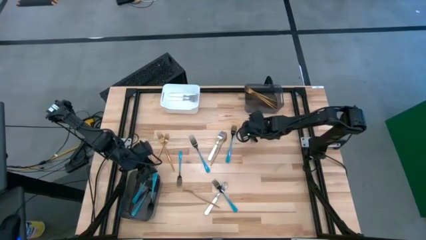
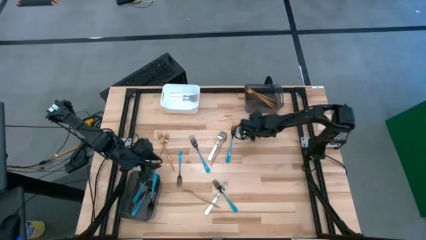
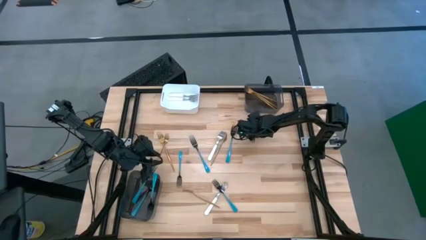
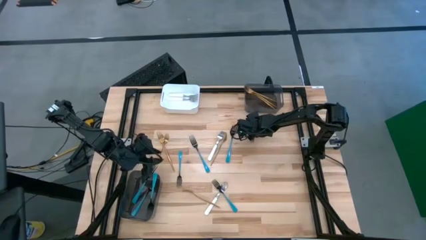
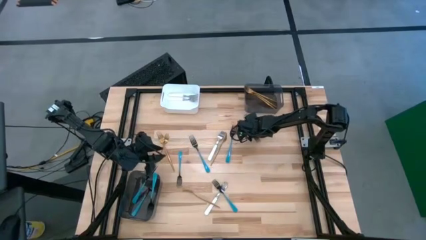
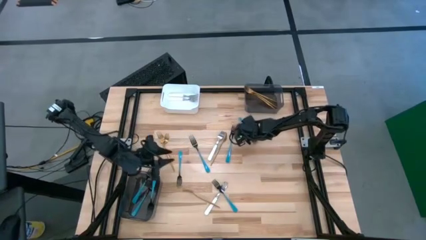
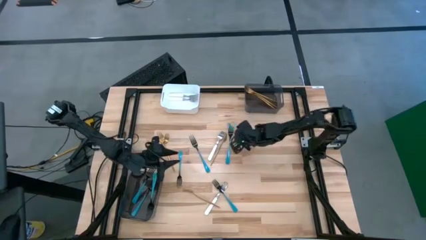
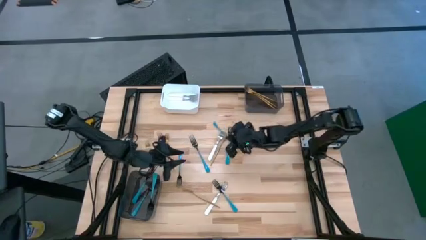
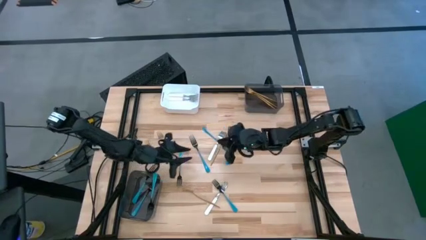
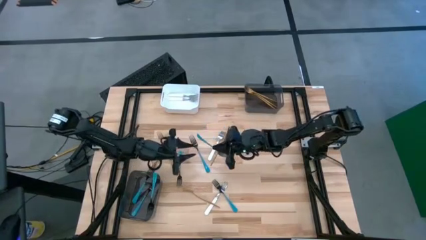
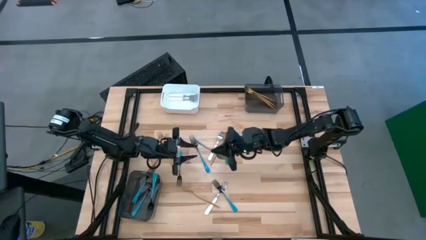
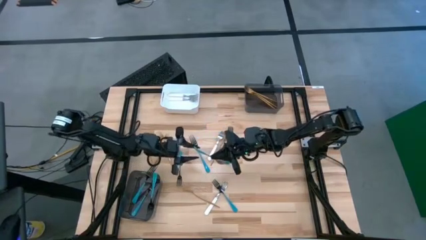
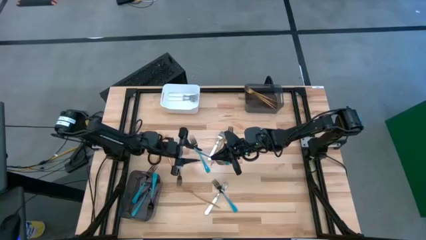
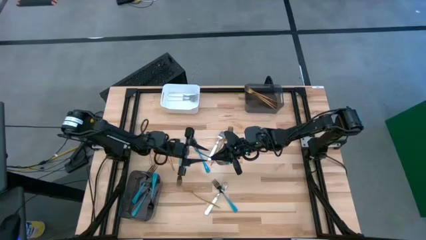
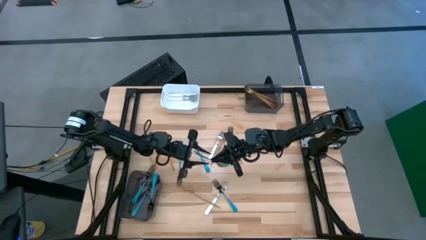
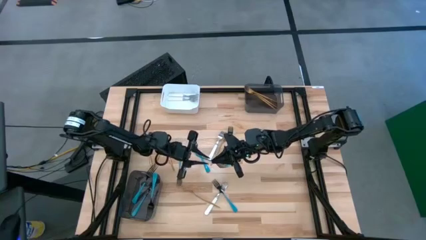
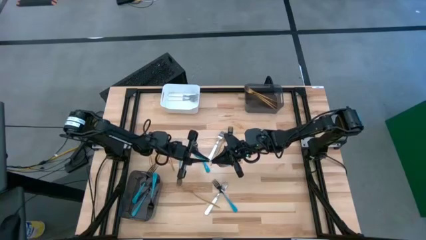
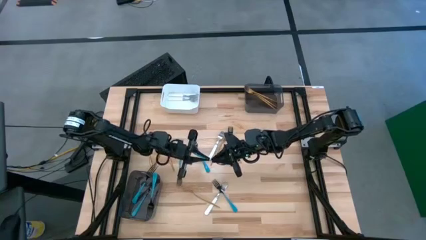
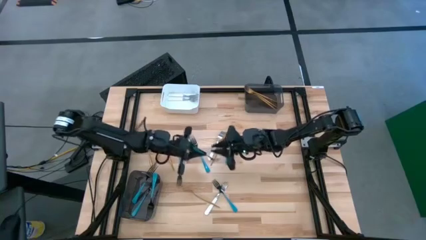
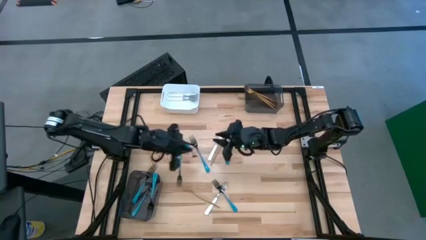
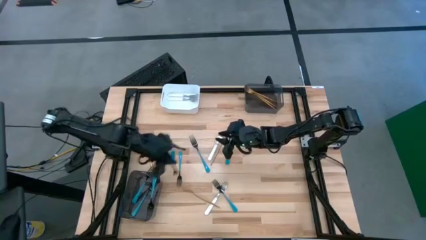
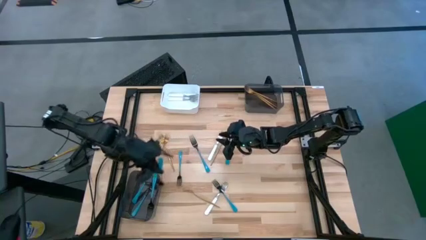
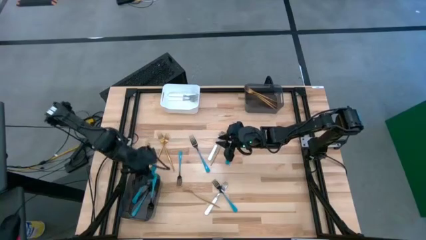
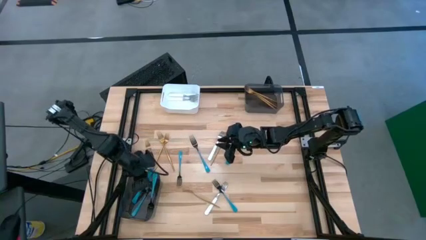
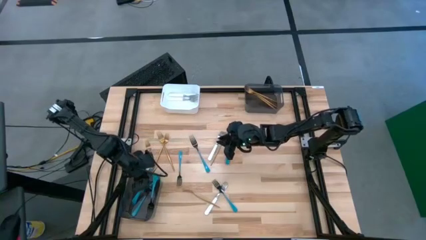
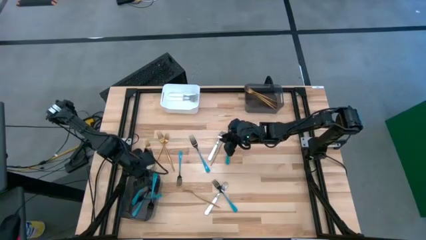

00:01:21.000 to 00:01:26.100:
Task: Sort silverware by color (type)
Put the blue fork into the bottom black bin

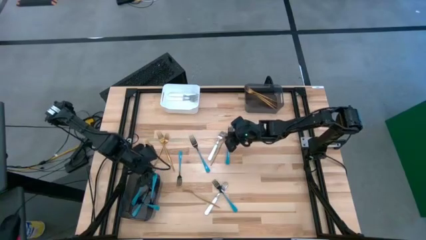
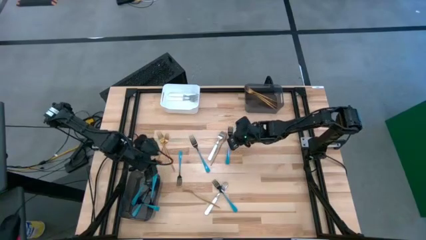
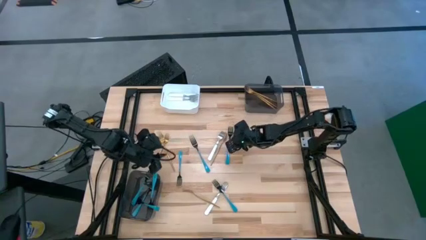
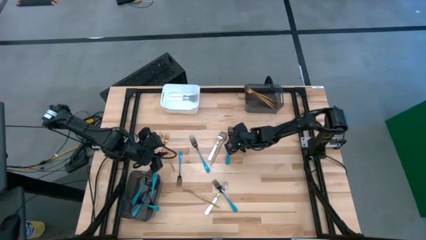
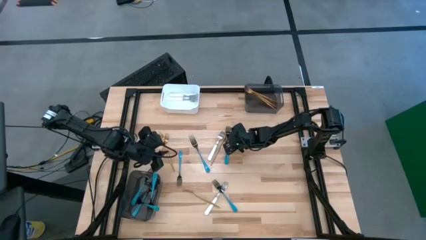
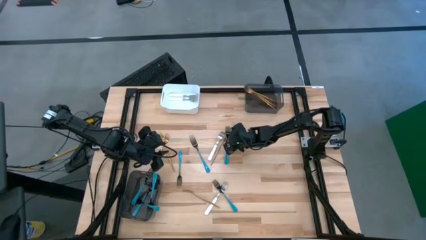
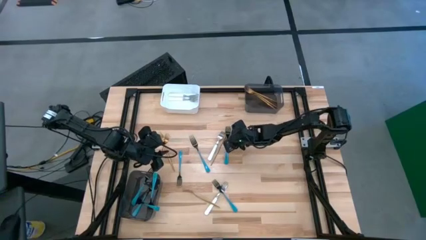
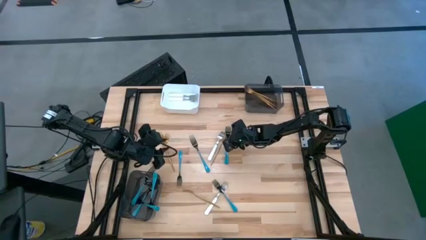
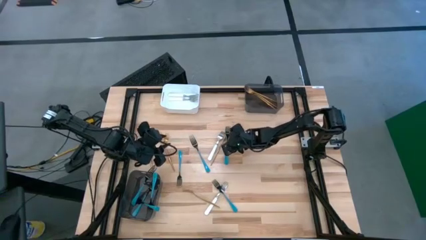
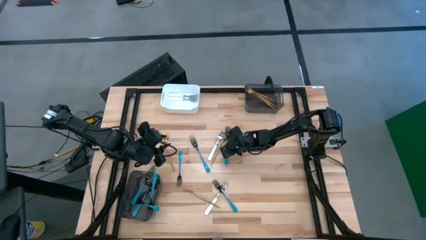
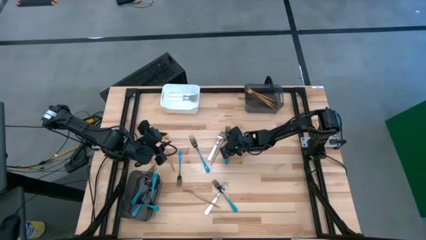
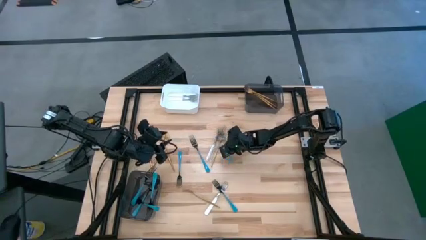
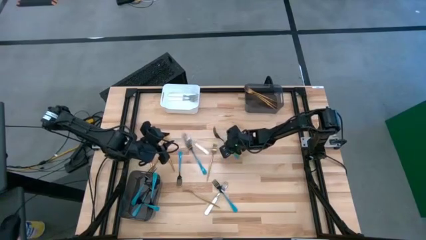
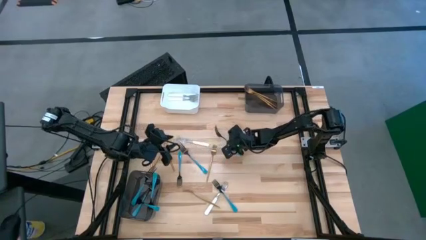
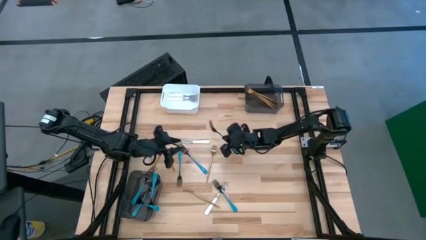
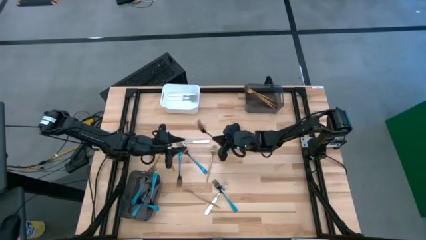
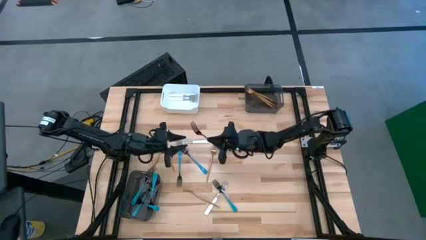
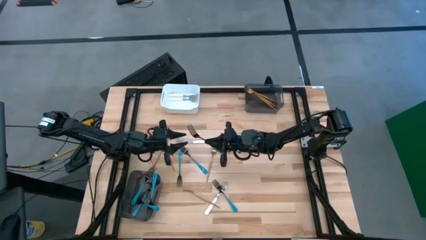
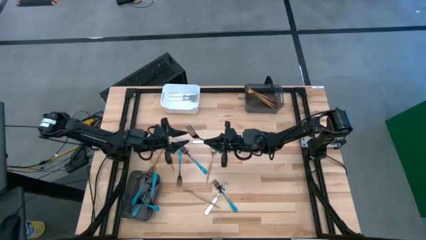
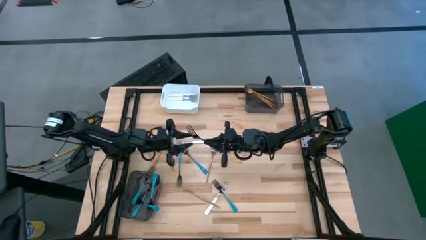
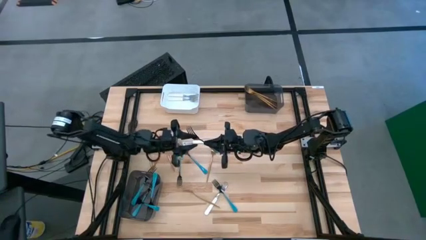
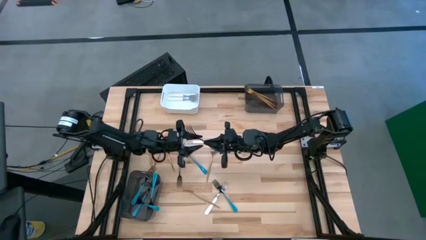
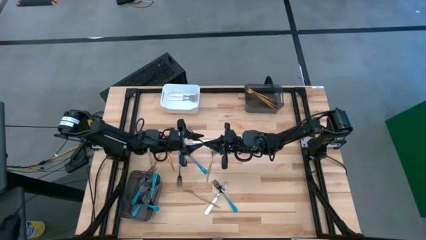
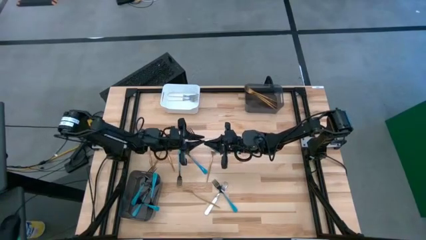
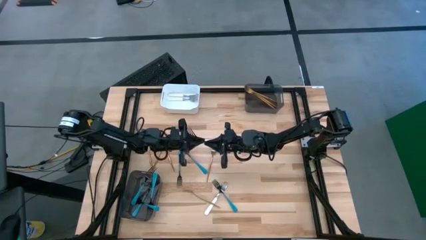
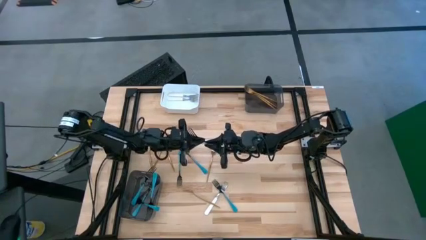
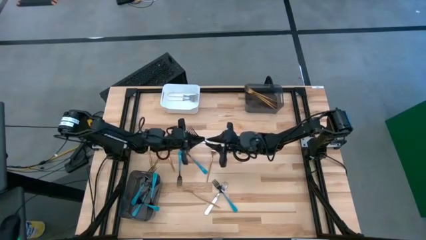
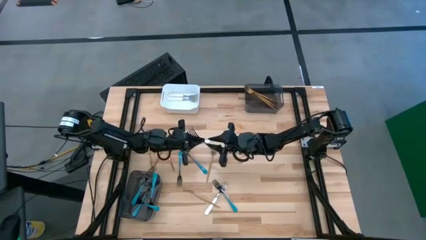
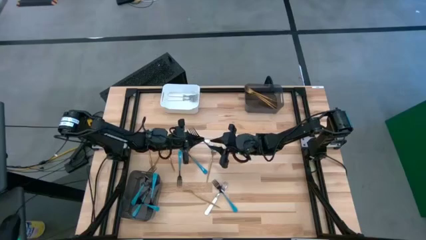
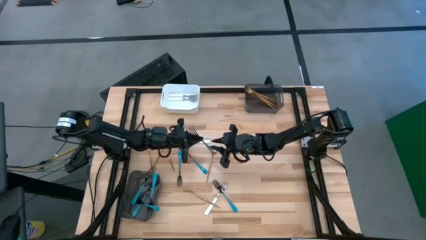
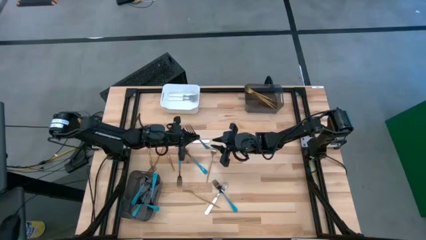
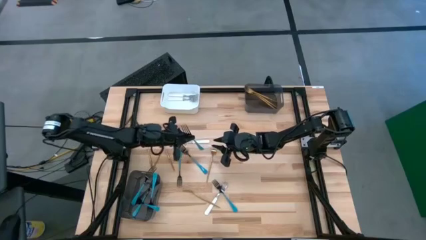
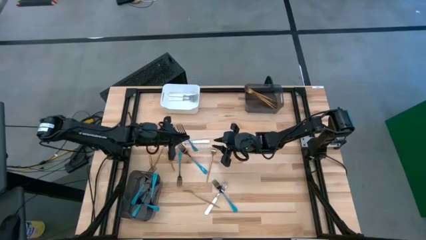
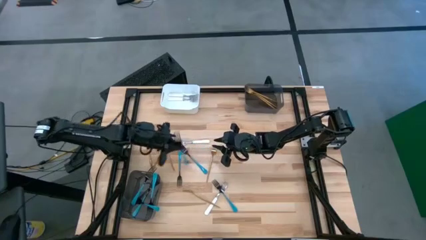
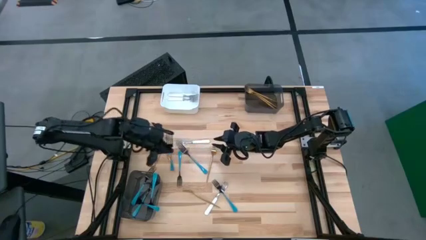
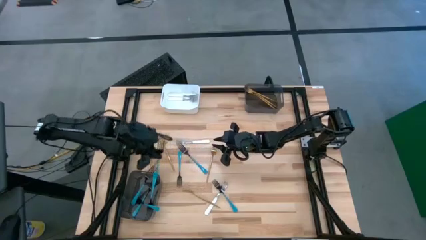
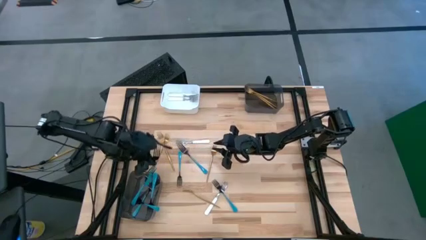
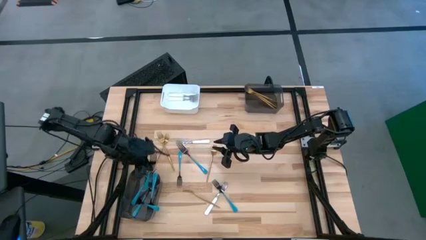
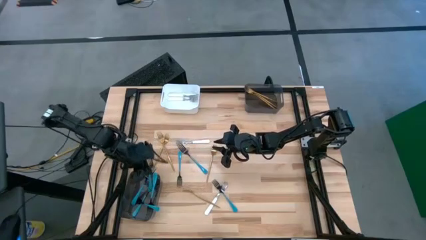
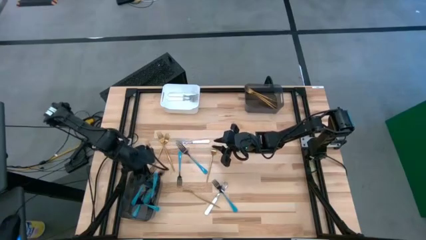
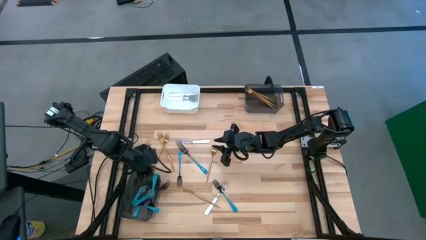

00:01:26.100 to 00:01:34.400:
Put the blue fork into the bottom black bin

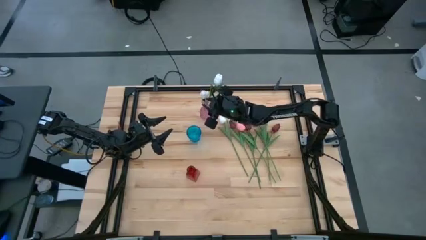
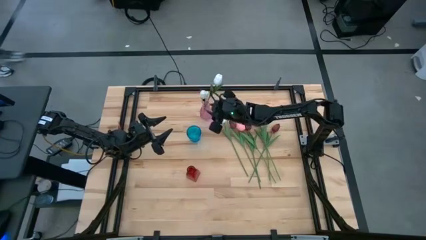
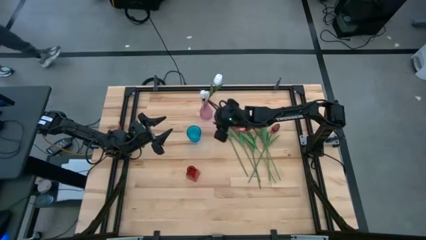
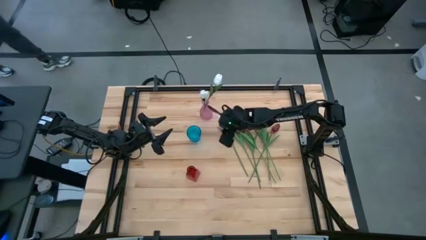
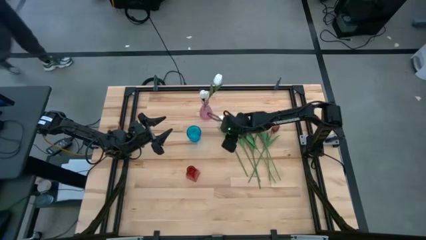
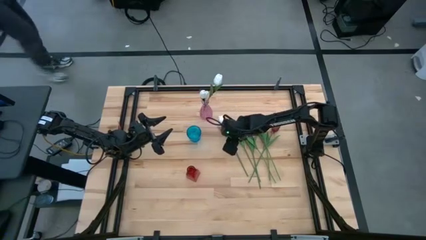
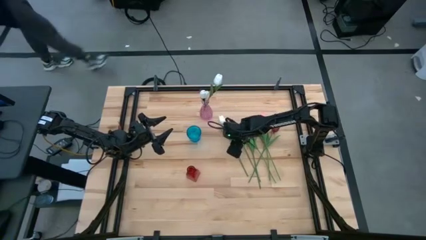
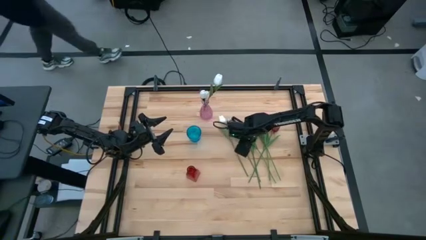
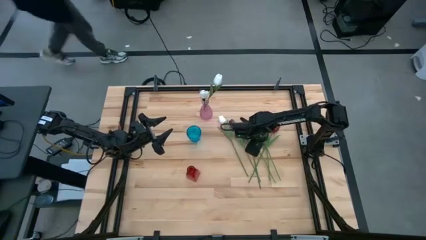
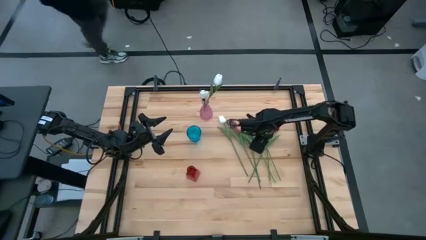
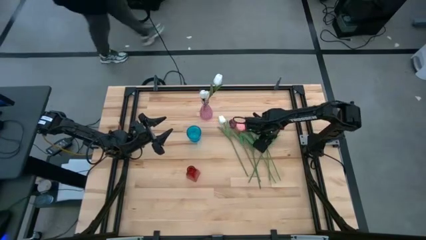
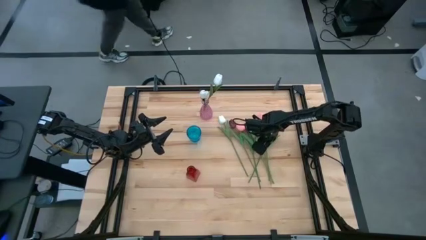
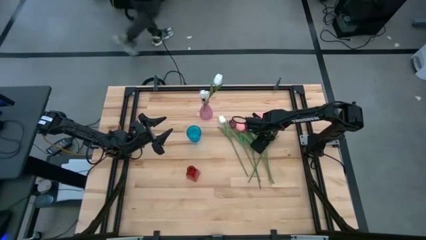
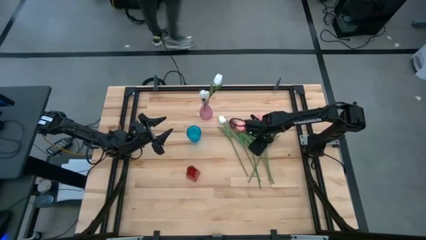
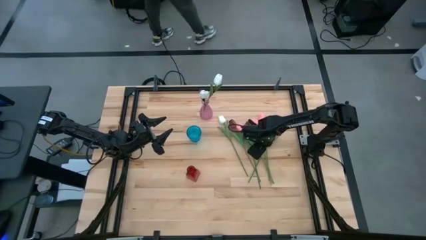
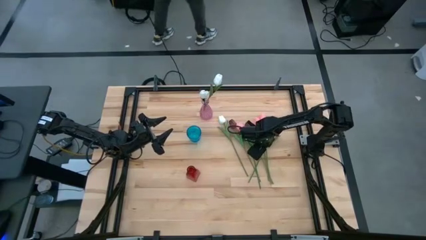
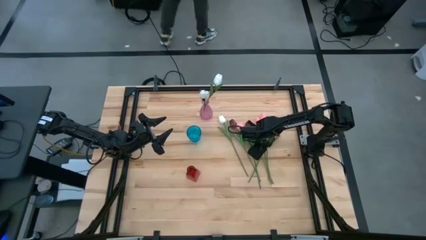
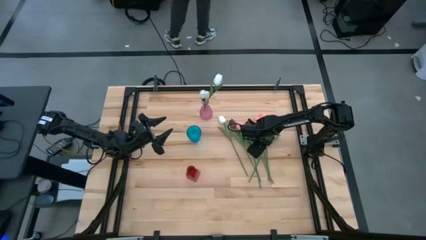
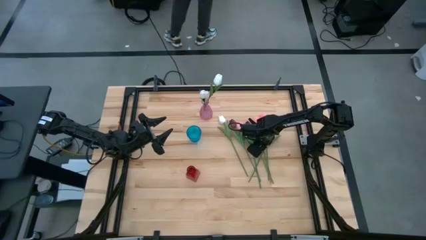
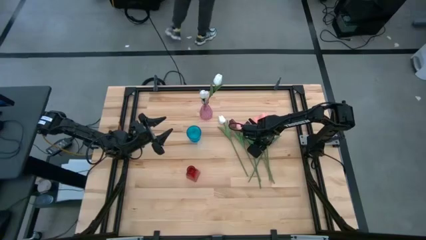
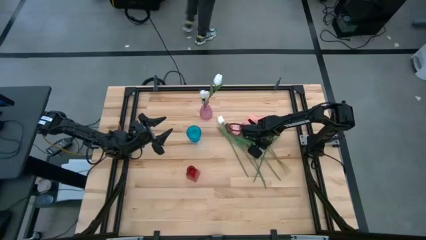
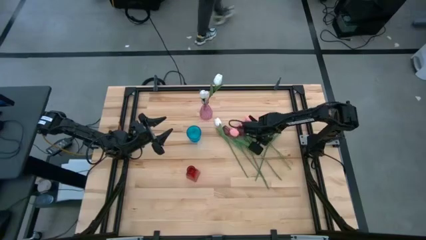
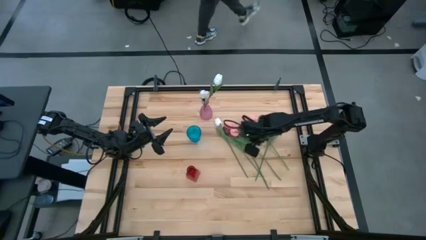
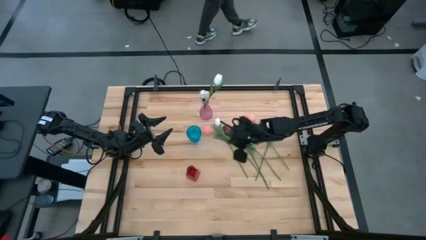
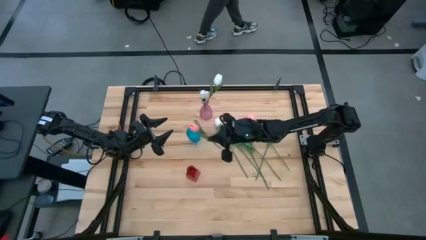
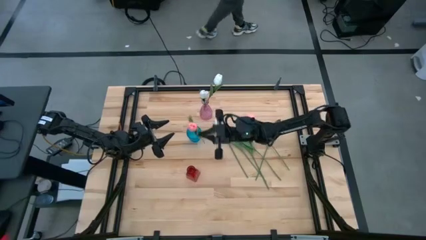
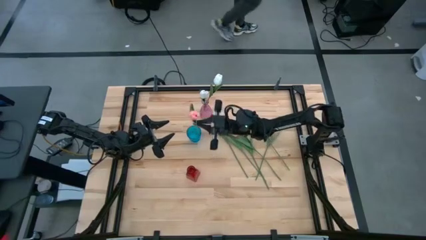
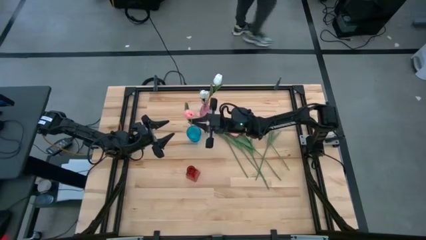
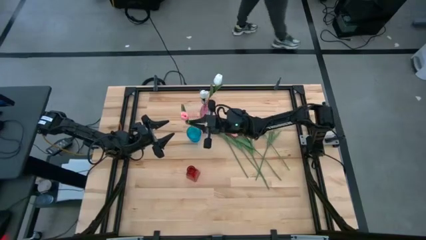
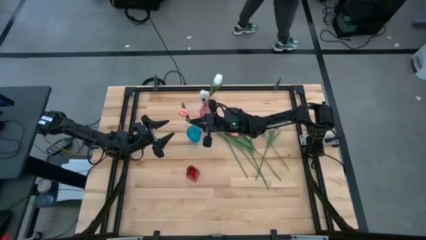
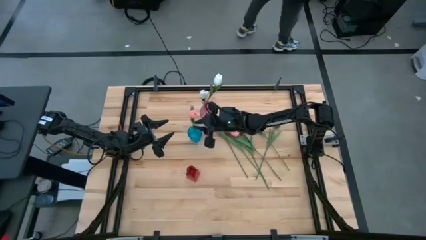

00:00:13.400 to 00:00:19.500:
Task: Sort flowers into vase by color
Put the middle pink flower into the blue vase
